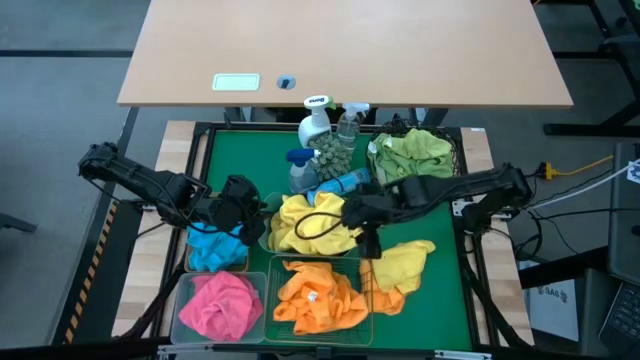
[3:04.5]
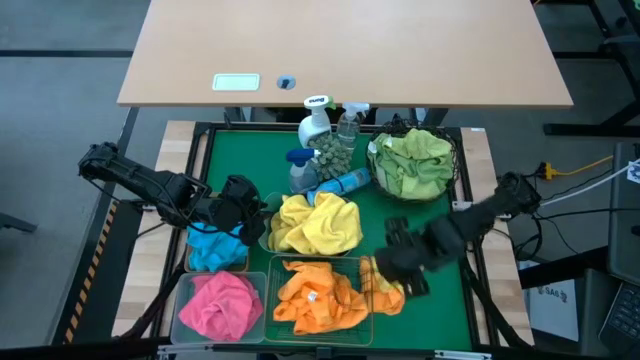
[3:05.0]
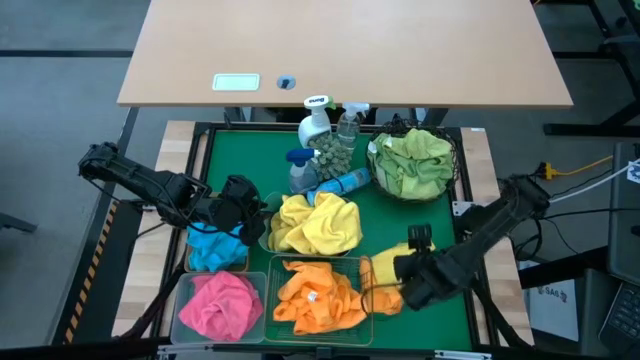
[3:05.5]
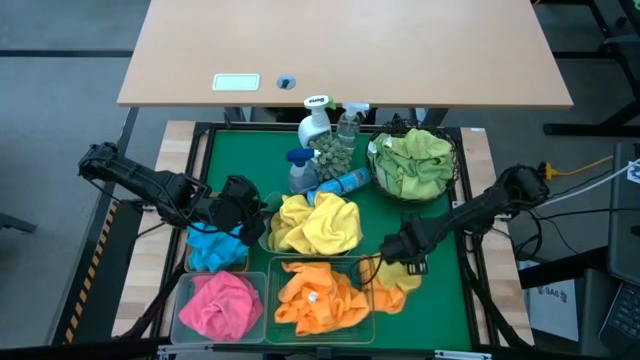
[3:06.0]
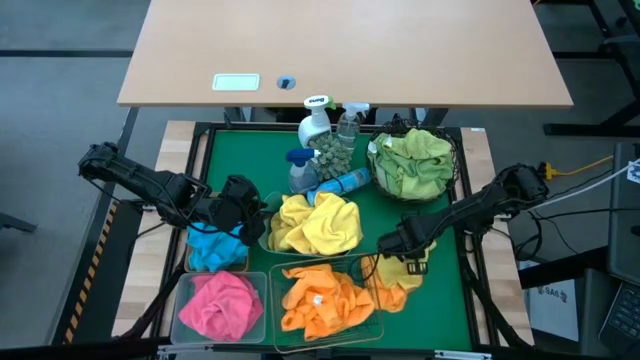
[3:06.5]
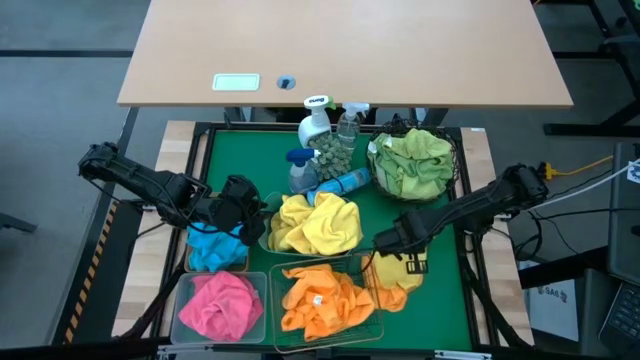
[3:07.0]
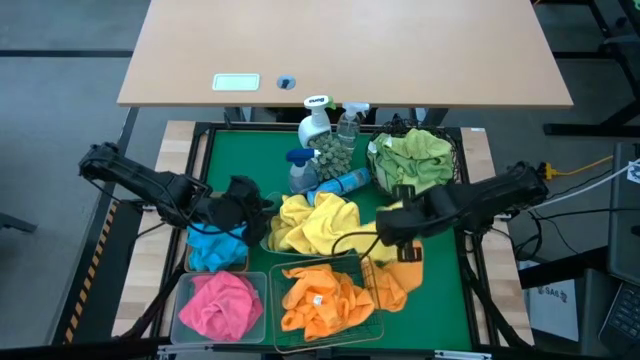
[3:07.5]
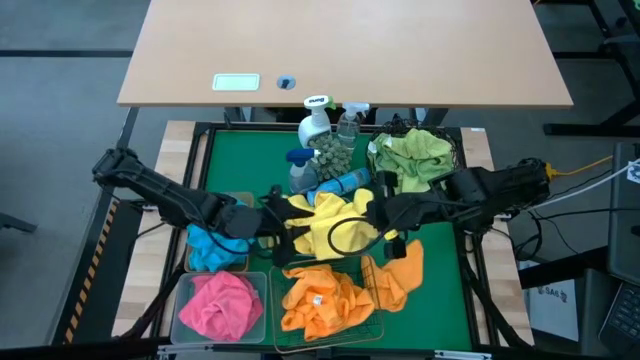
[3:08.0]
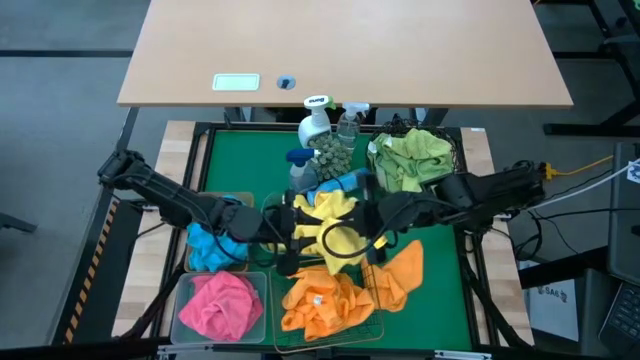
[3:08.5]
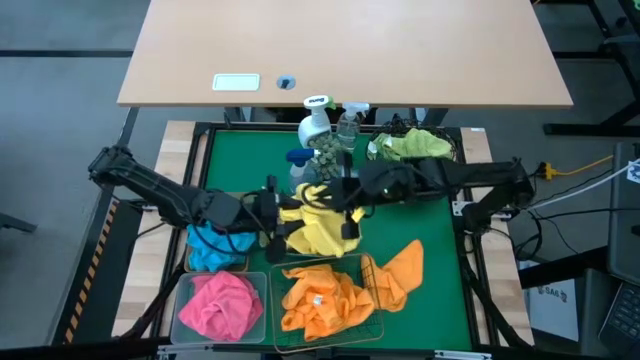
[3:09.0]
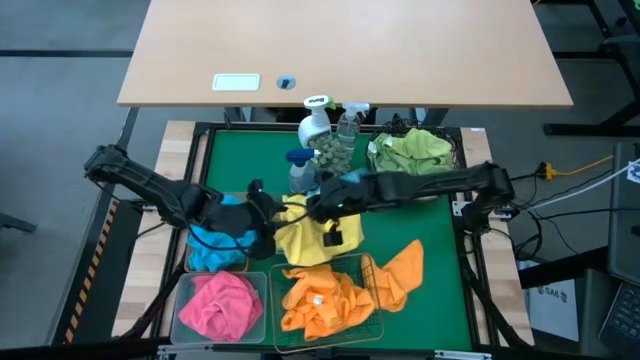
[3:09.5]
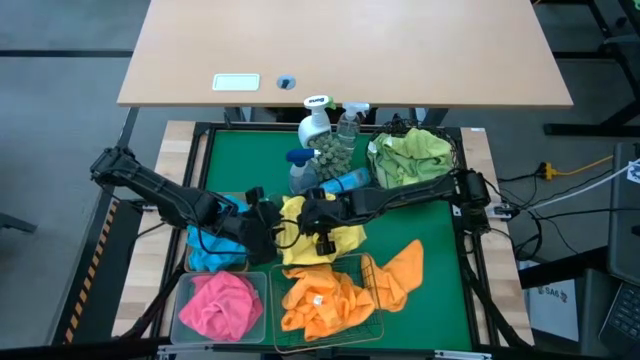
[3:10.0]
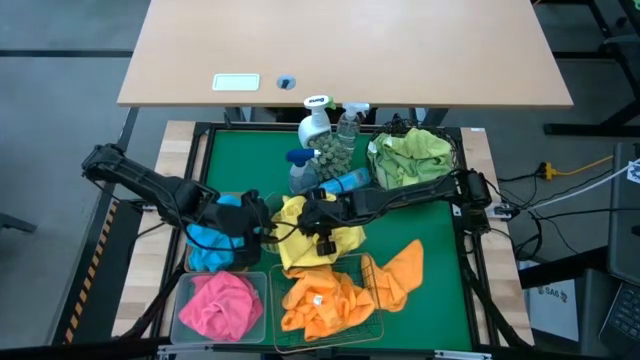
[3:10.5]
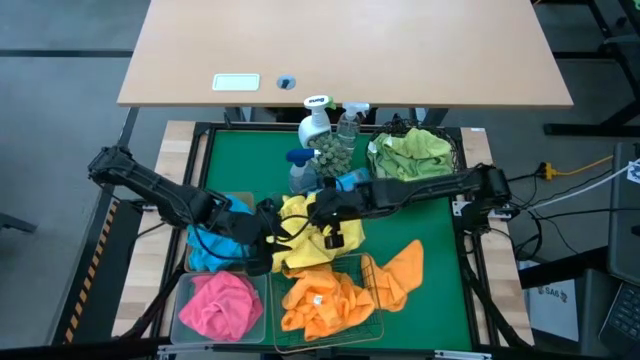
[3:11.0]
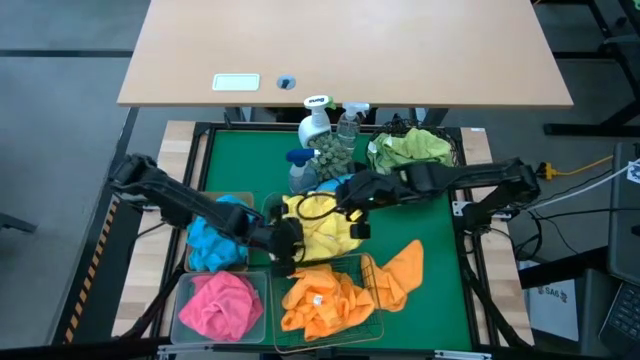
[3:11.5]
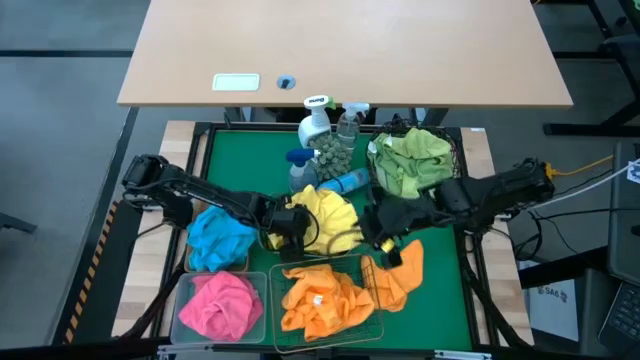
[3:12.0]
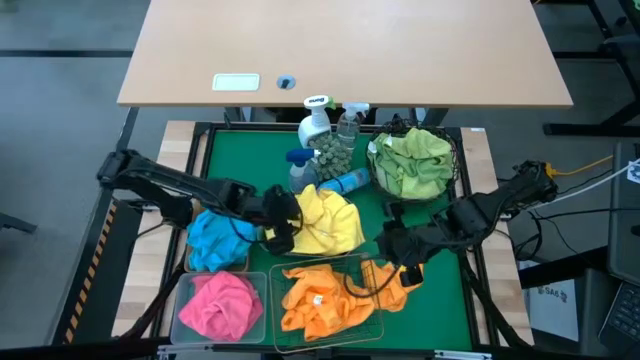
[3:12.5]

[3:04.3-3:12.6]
Task: Sort microfiber towel by color & place in baskets
Put the yellow microfiber towel into the blue bin

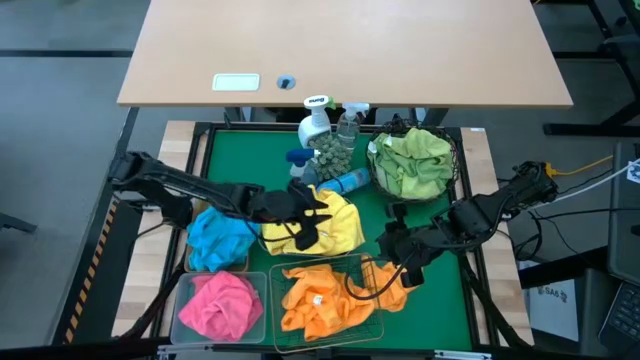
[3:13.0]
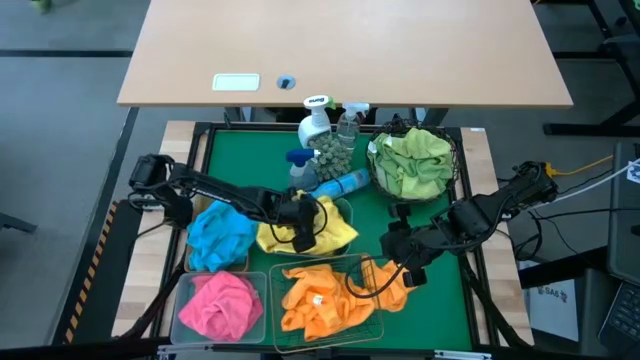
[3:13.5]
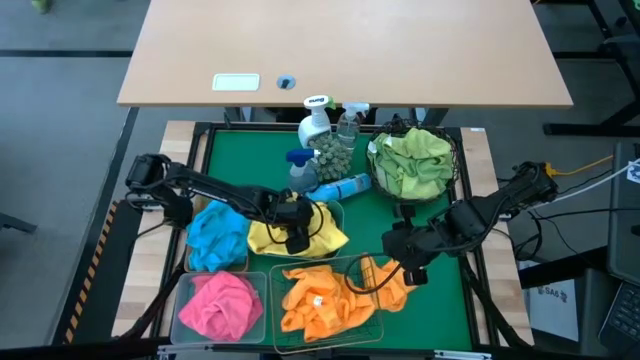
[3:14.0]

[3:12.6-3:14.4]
Adjust the yellow microfiber towels in the blue bin

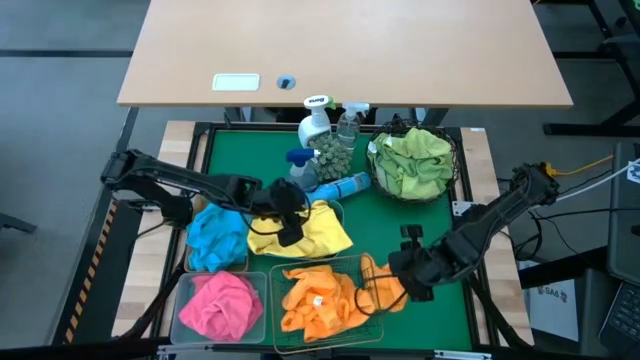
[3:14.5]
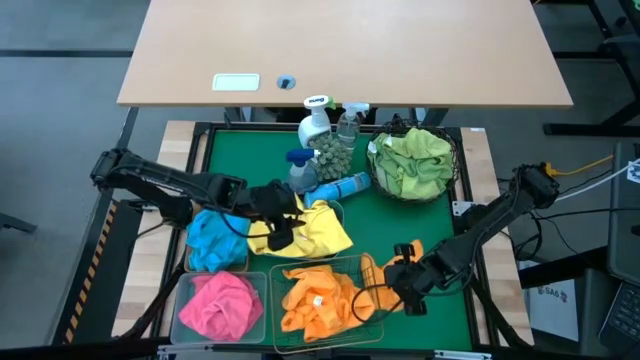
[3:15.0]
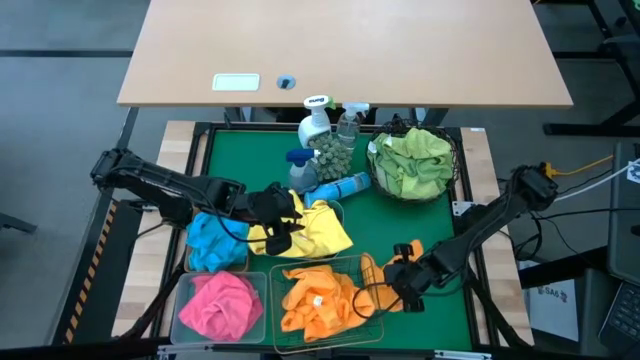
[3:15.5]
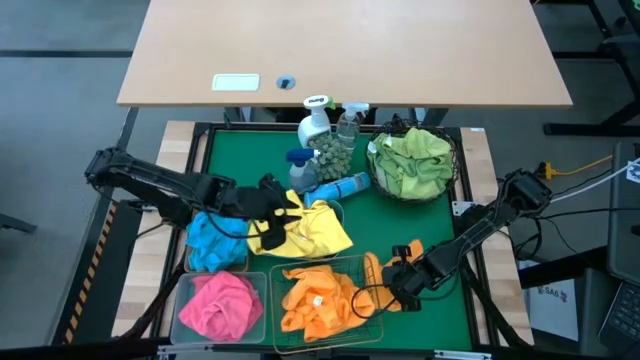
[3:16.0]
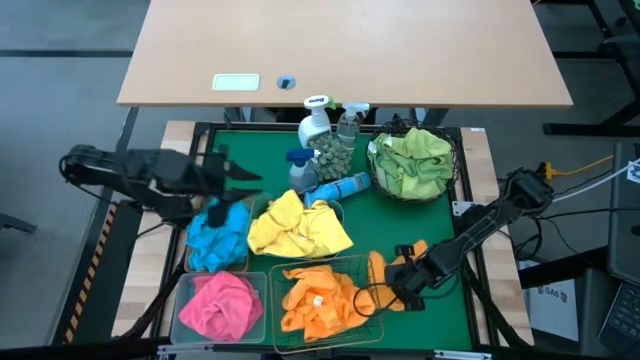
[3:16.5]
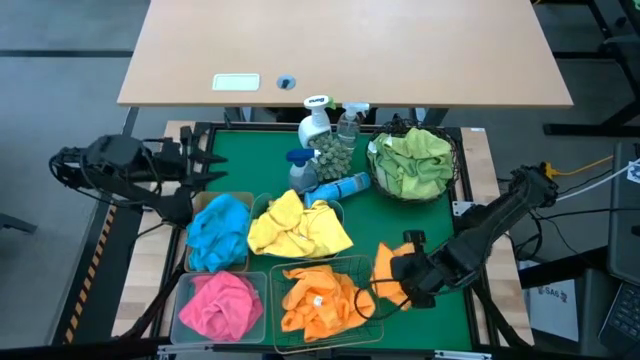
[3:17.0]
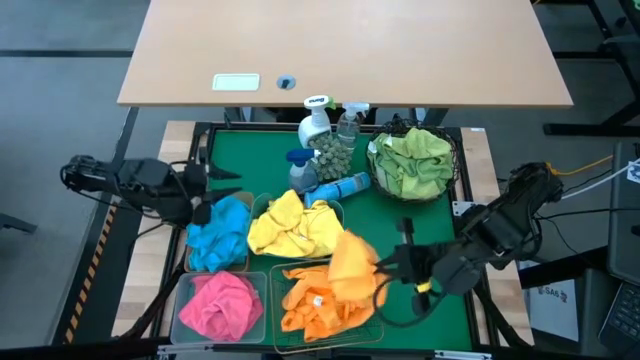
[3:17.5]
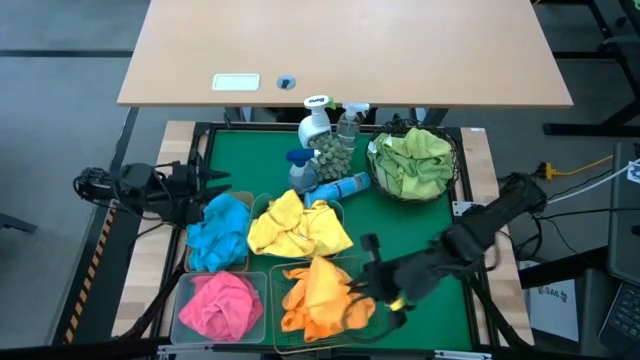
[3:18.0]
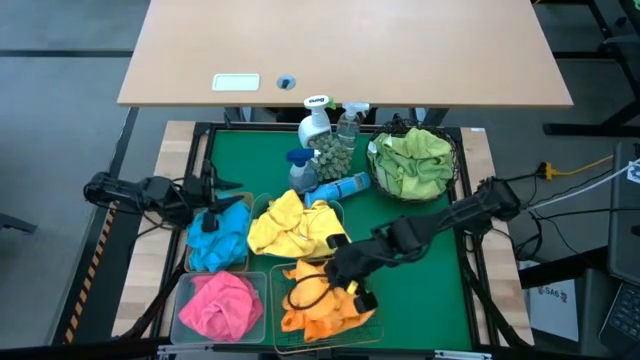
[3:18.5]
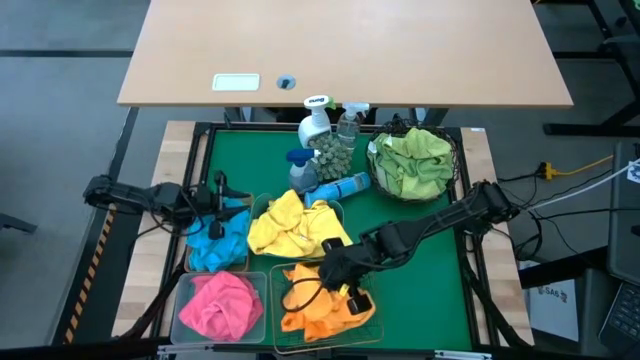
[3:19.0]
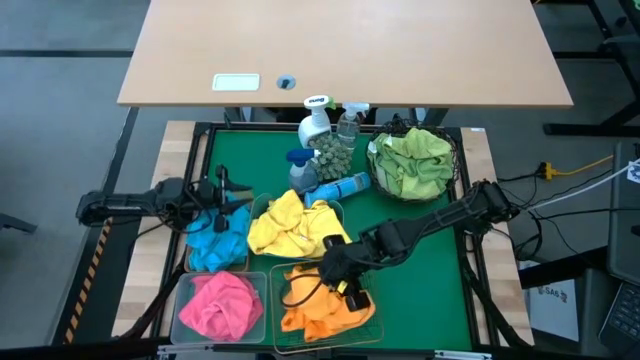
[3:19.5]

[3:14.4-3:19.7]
Put the orange microfiber towel into the gold wire basket

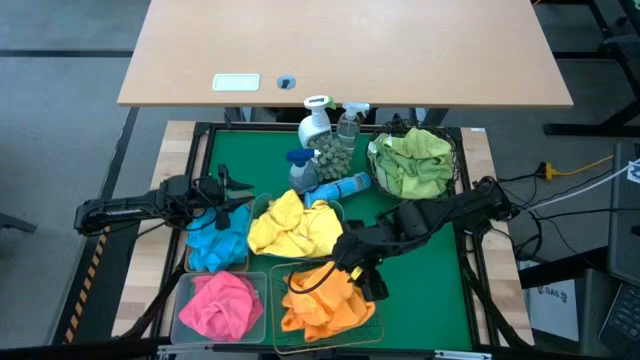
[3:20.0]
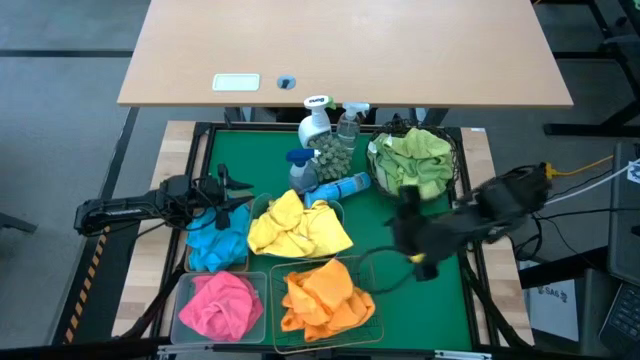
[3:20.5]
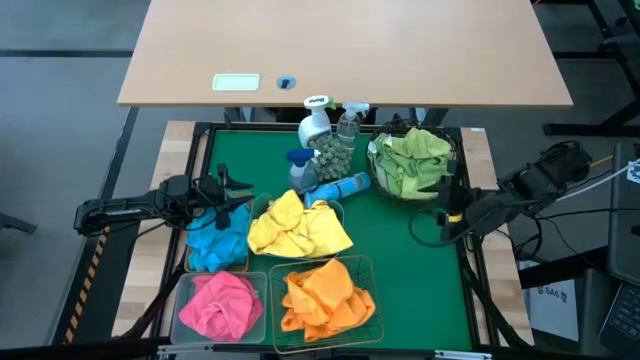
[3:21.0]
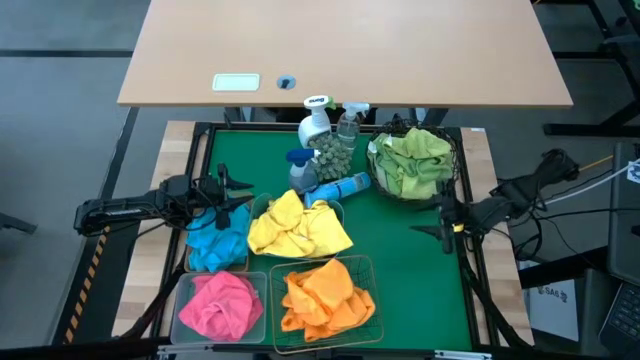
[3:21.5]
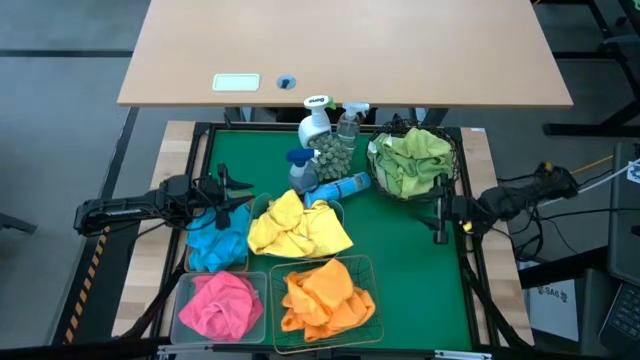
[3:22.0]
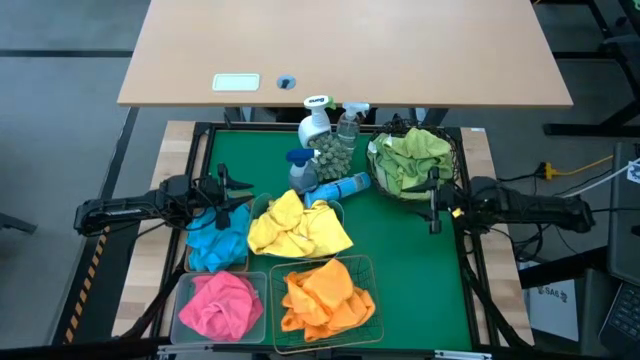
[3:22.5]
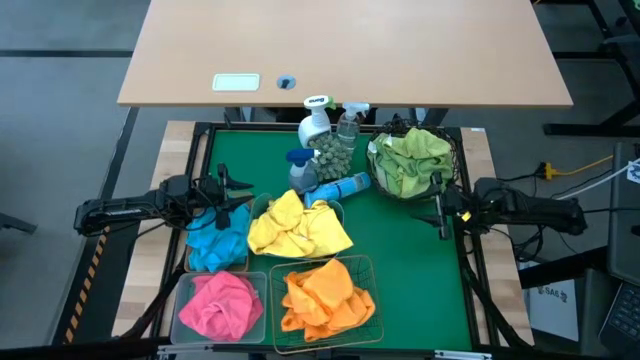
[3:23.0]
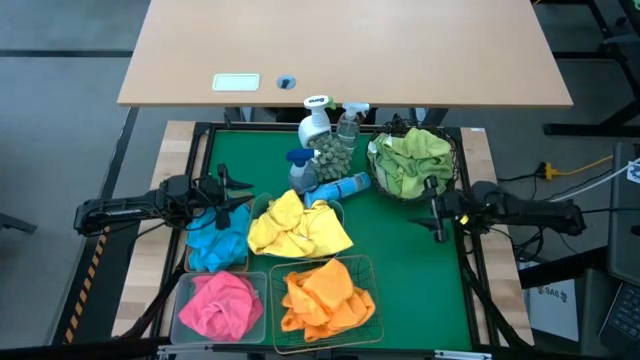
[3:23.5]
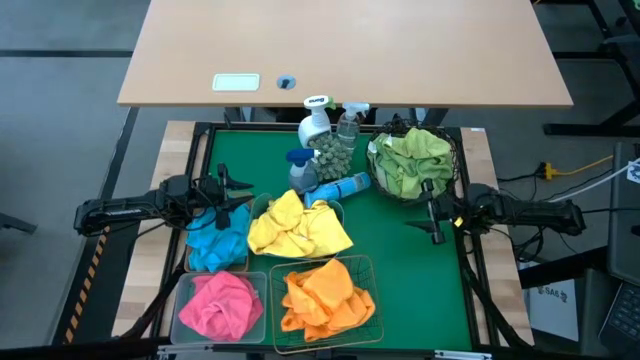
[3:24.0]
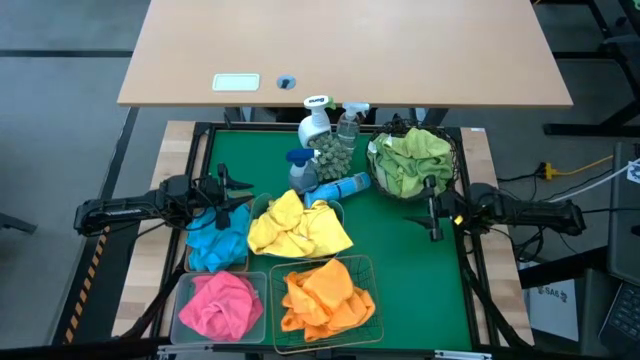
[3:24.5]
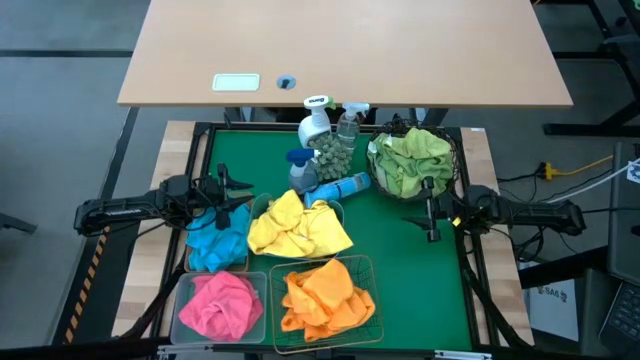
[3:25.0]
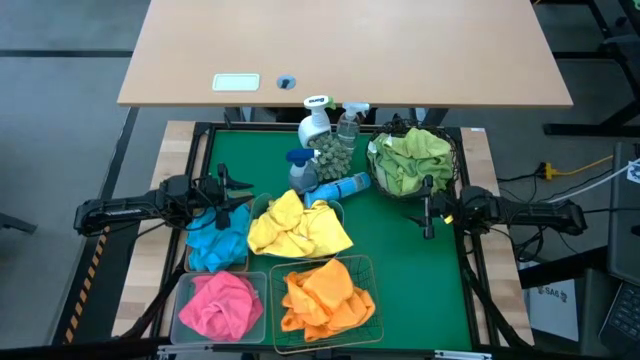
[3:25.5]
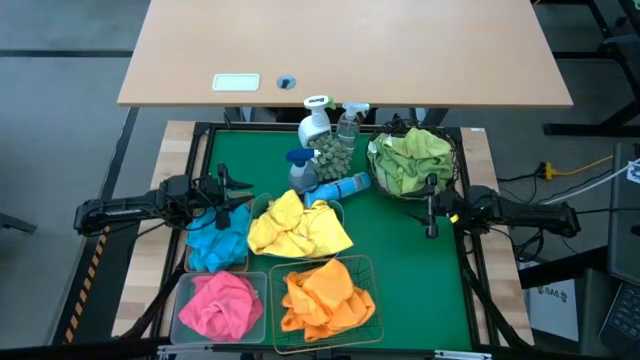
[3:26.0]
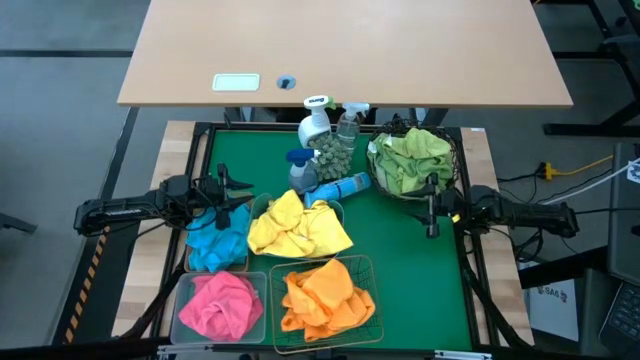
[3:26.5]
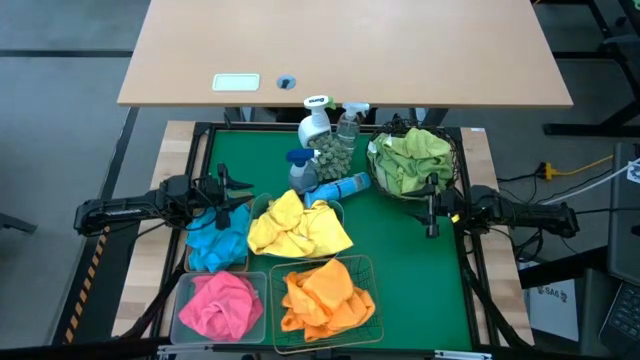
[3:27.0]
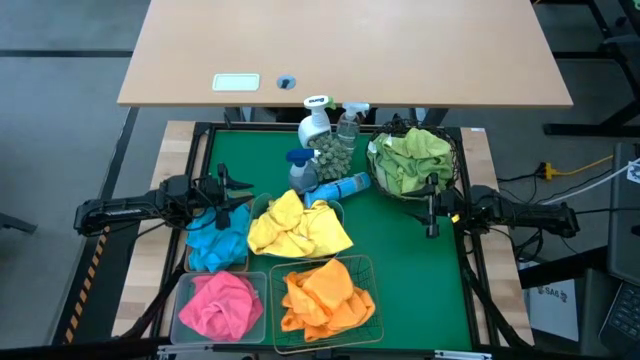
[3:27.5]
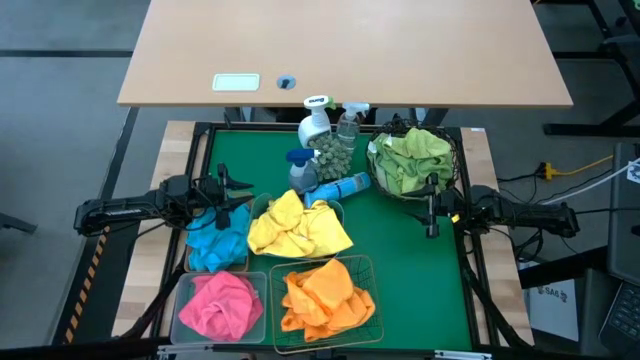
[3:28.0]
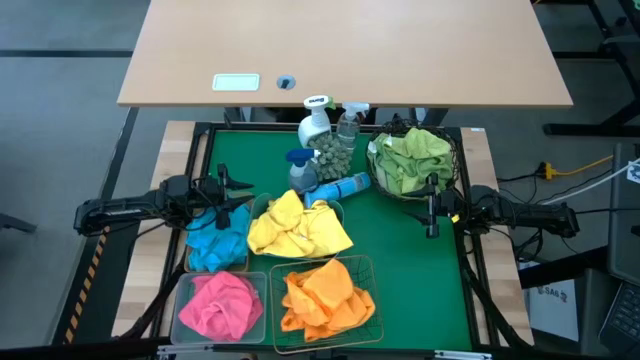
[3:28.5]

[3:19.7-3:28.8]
Return to Home Position
